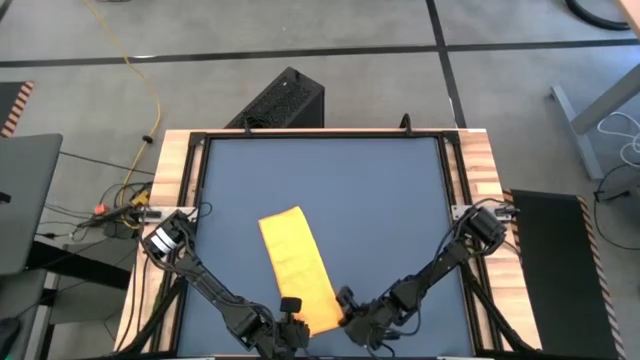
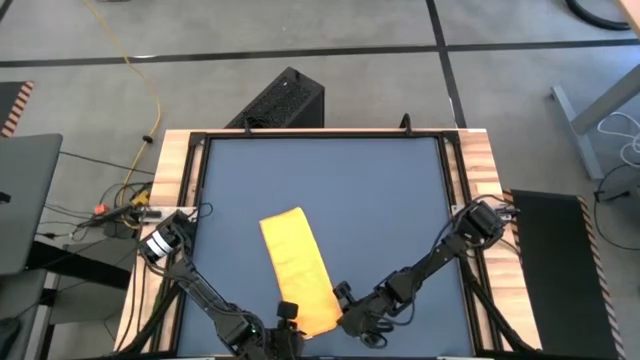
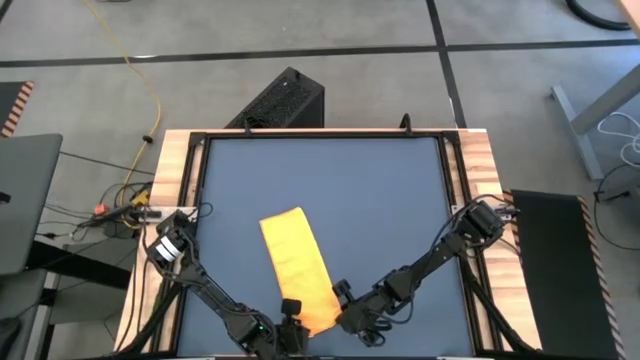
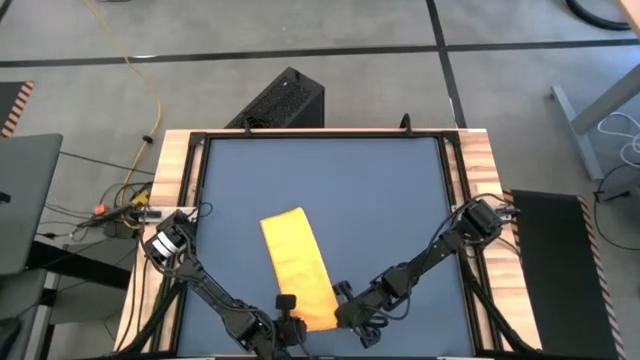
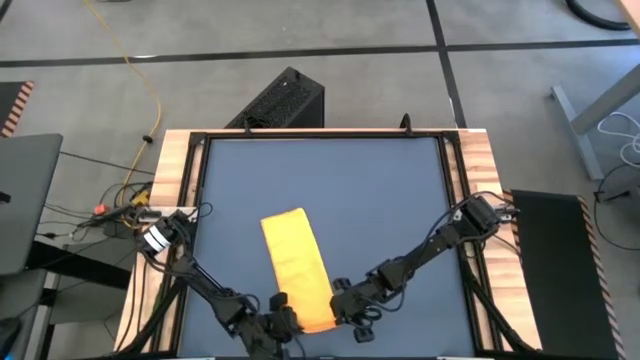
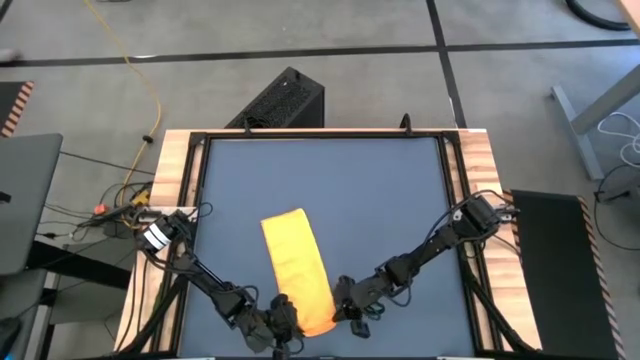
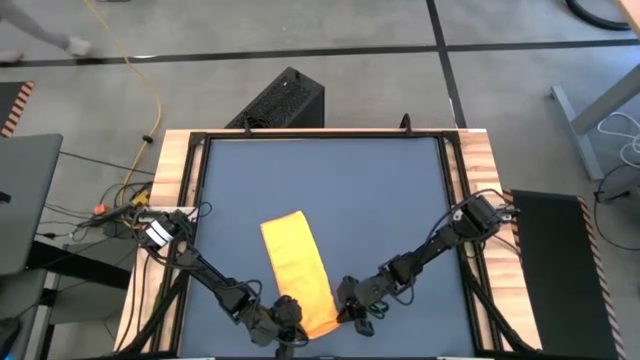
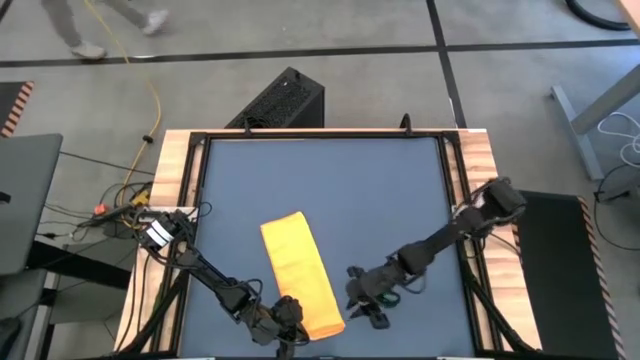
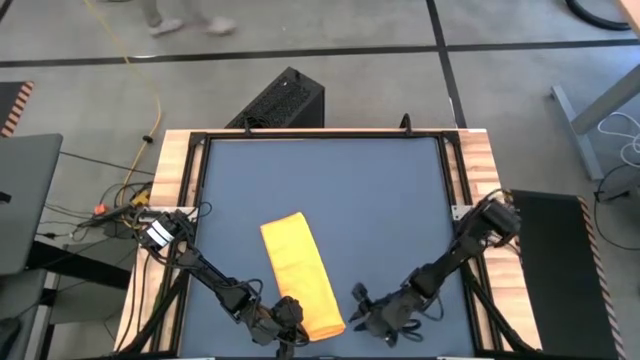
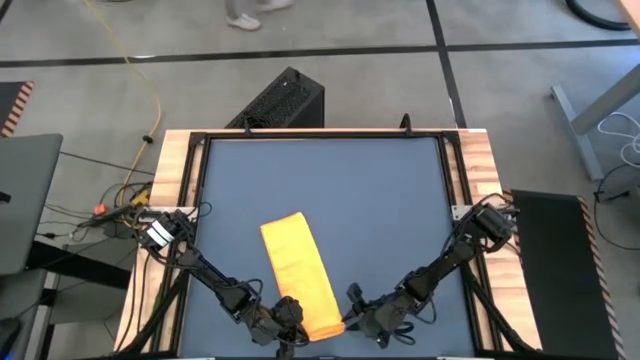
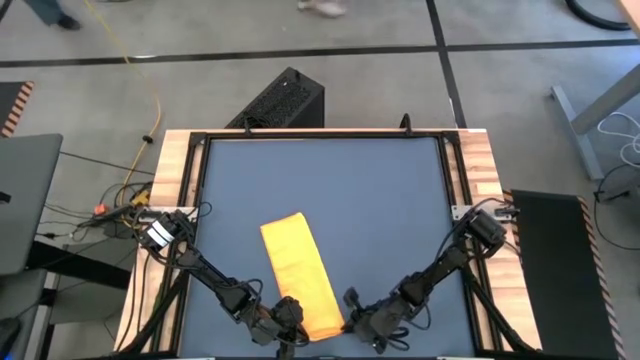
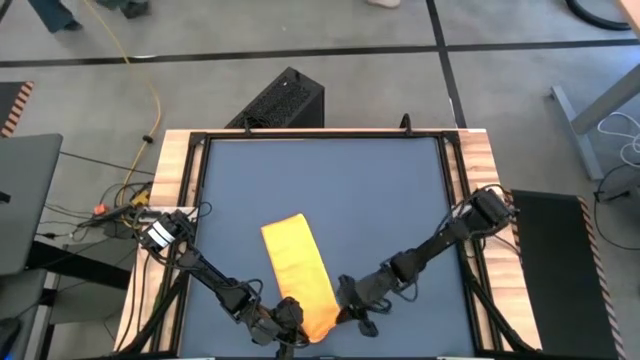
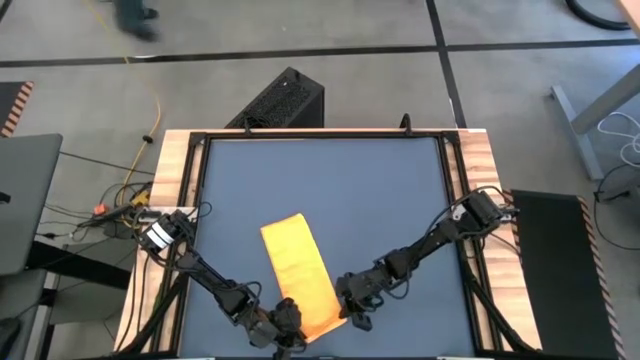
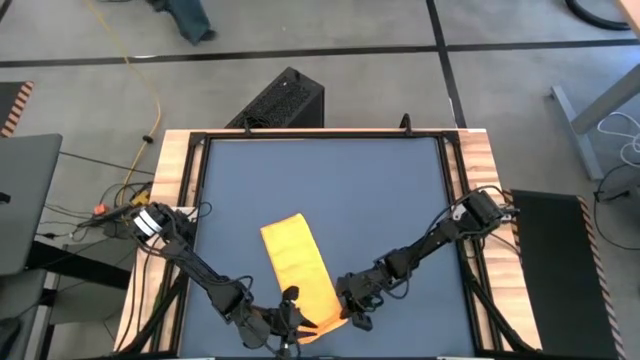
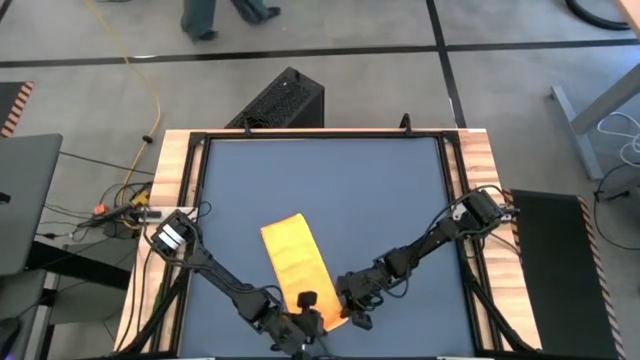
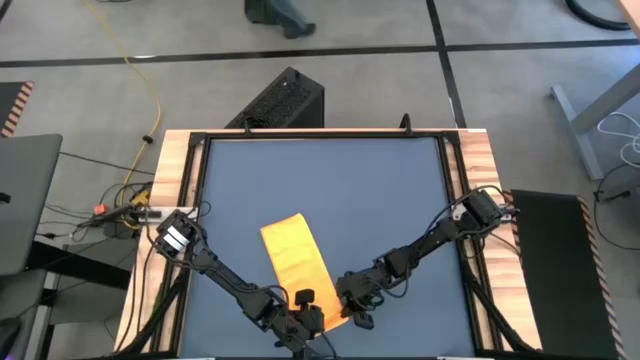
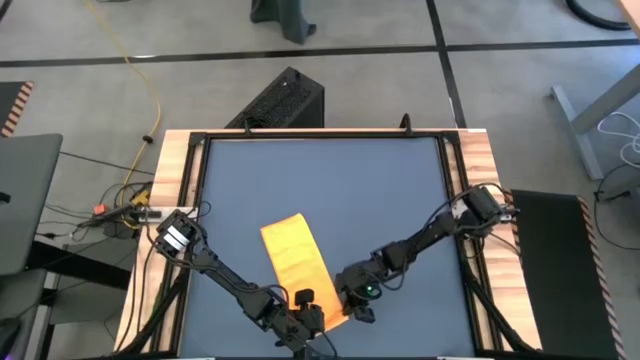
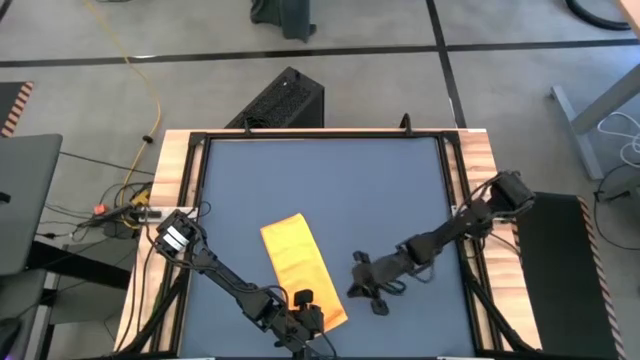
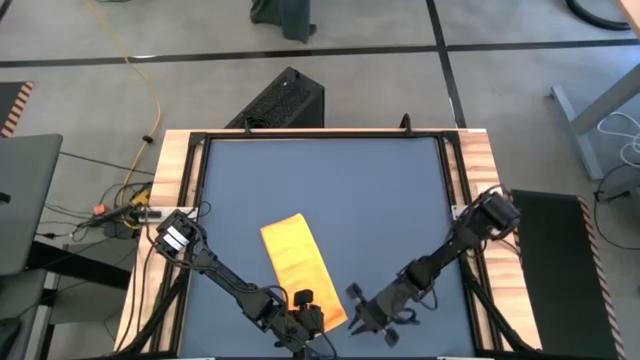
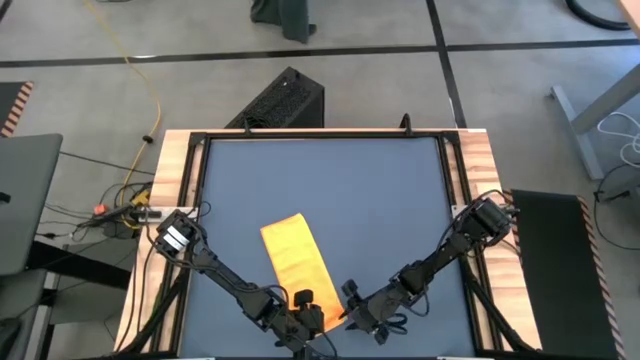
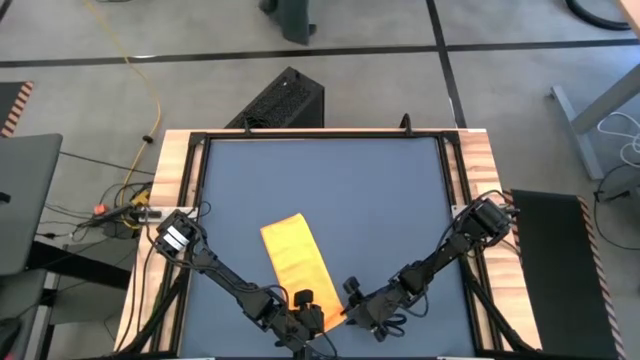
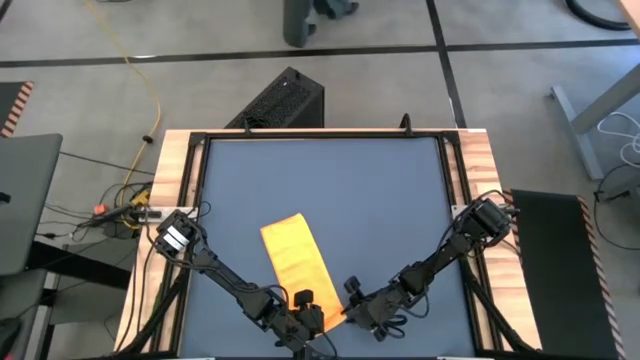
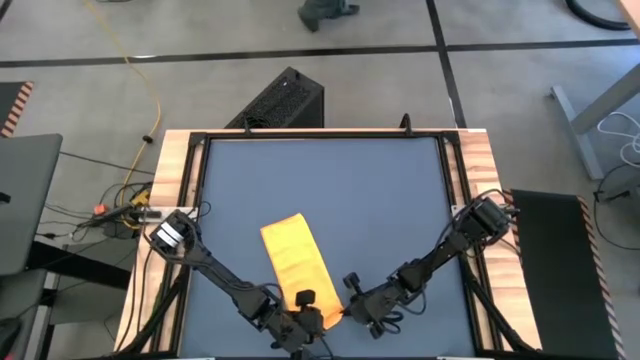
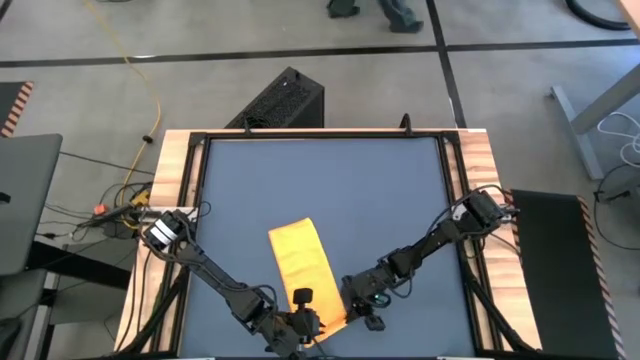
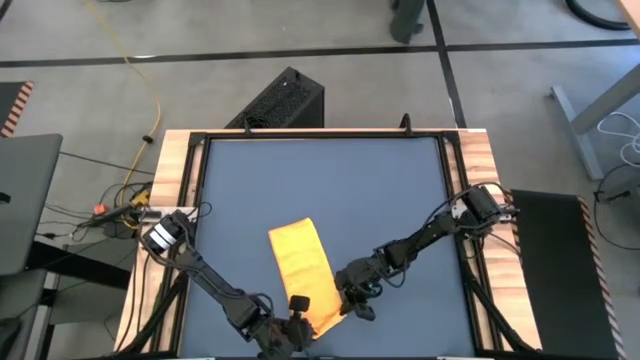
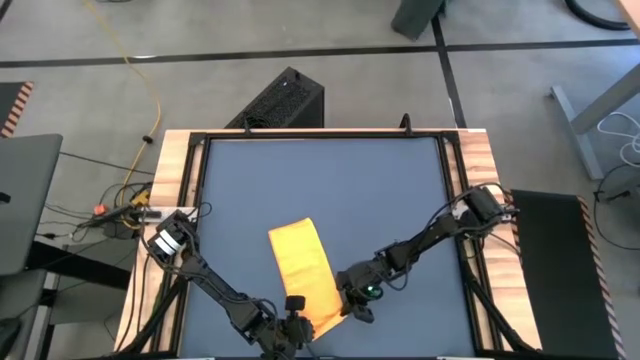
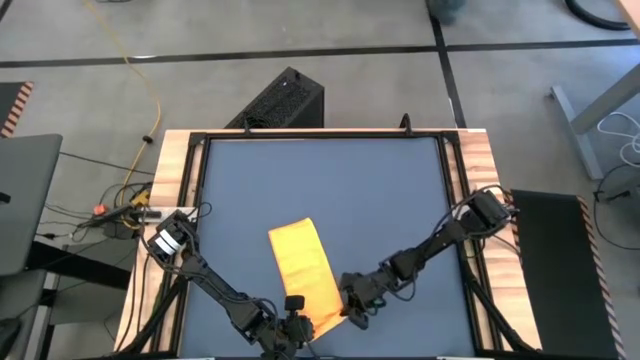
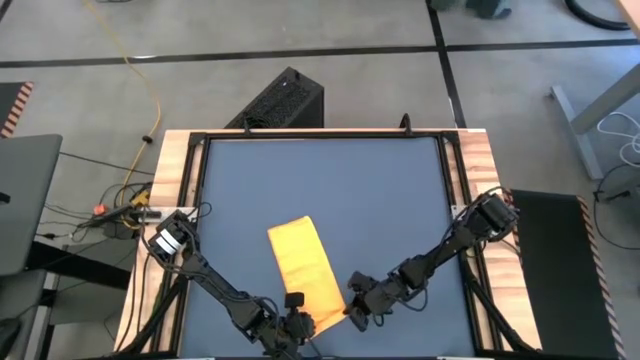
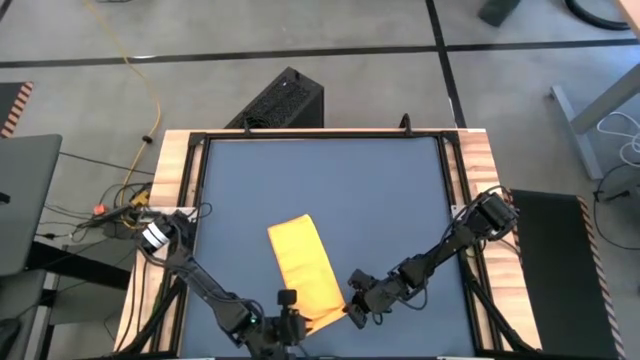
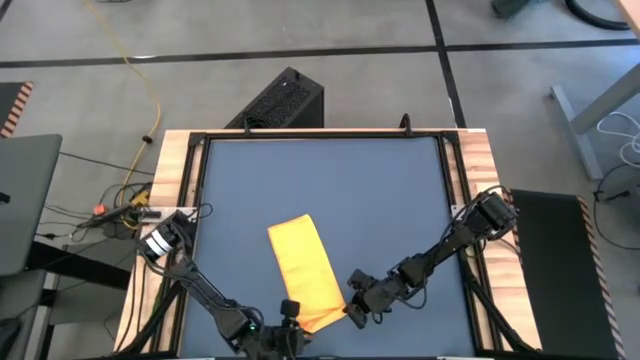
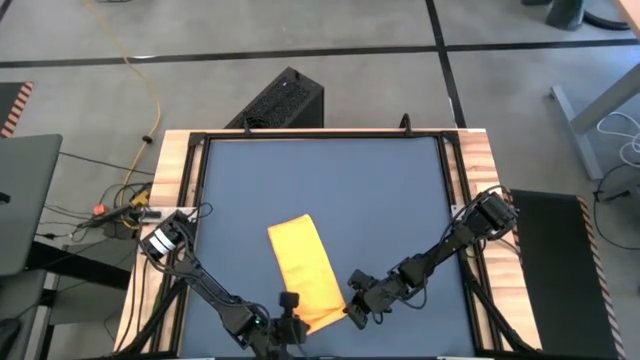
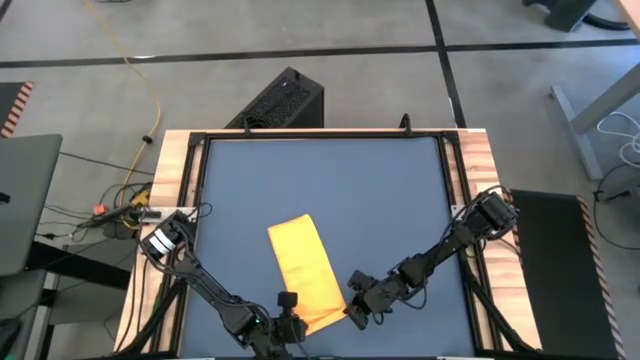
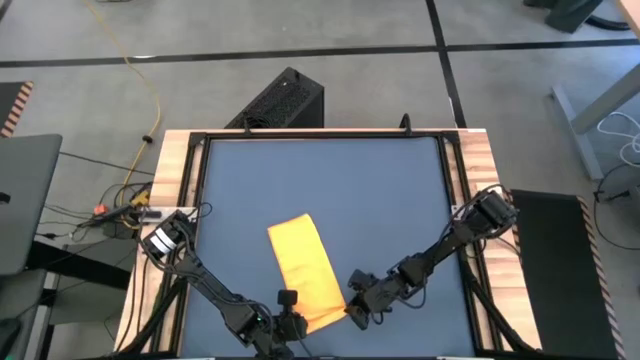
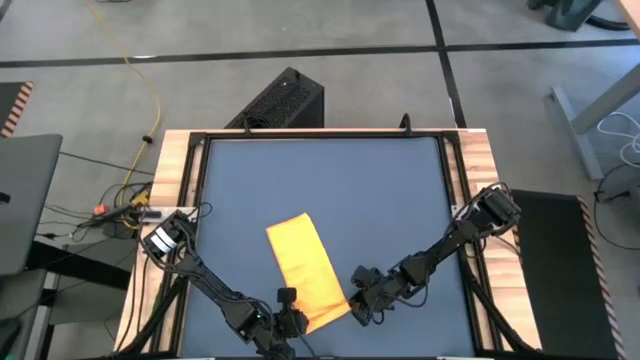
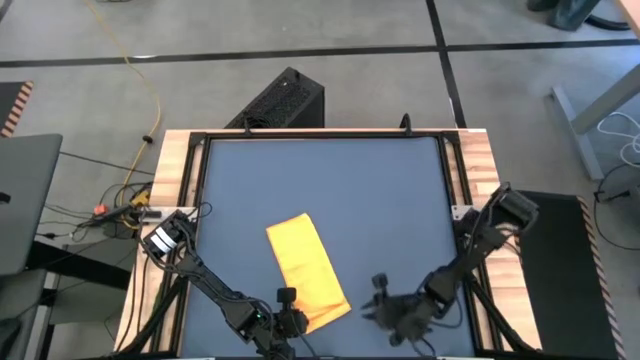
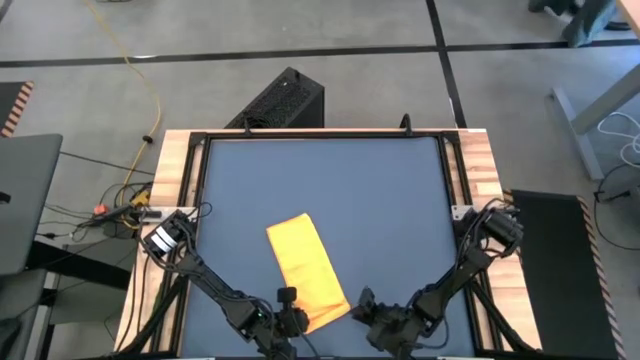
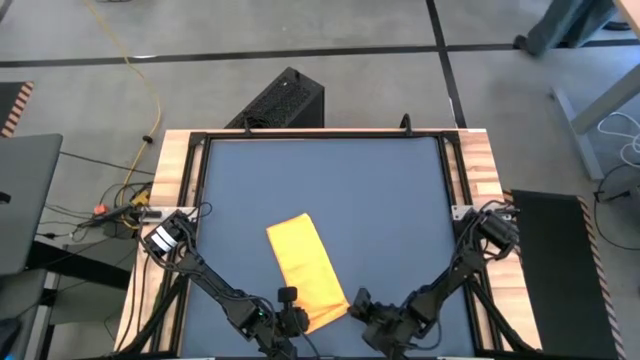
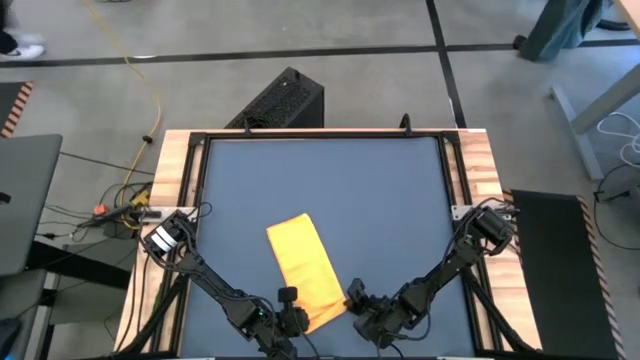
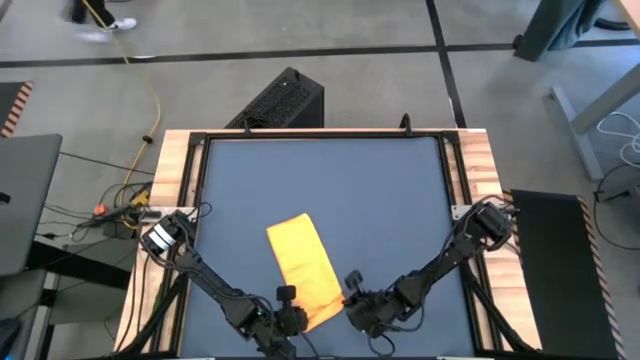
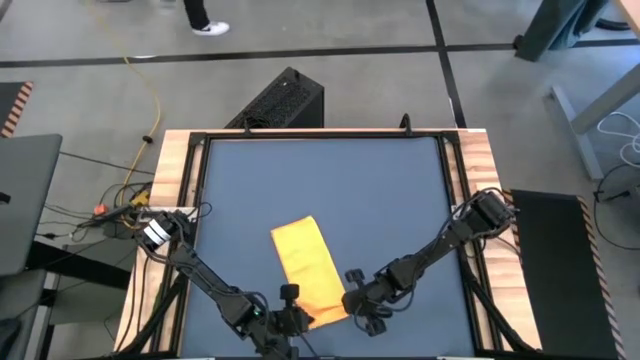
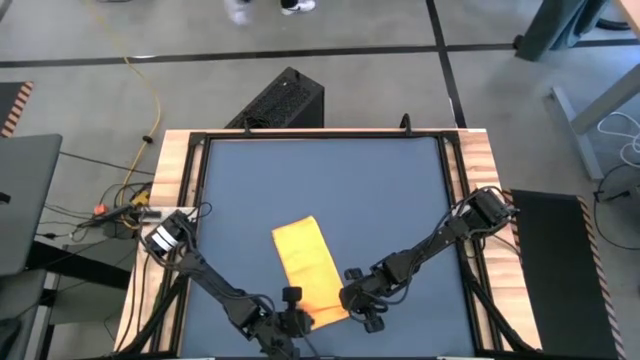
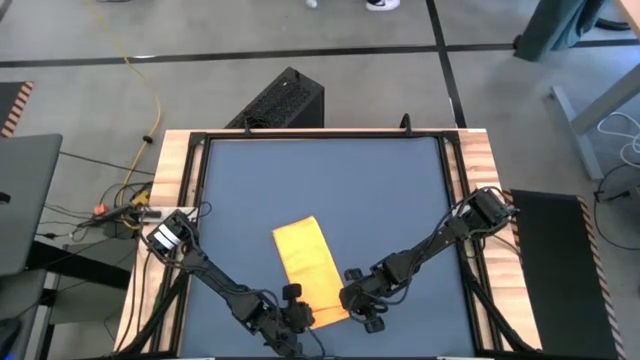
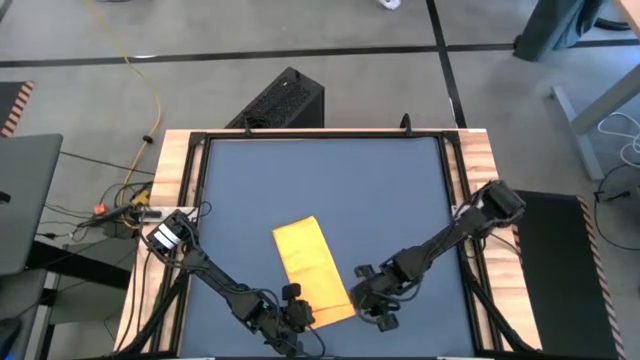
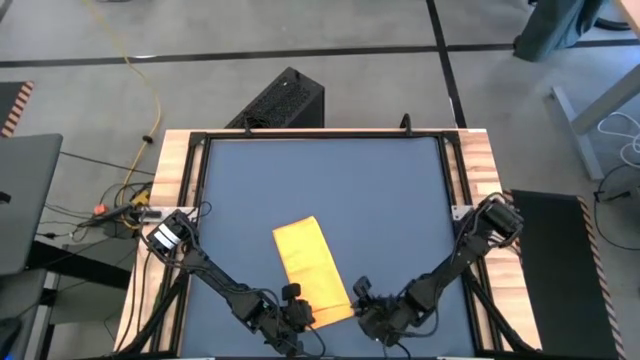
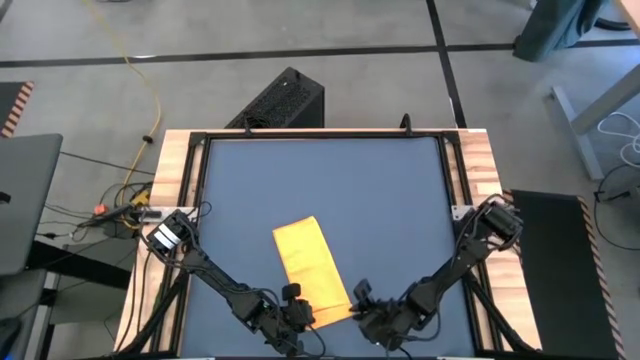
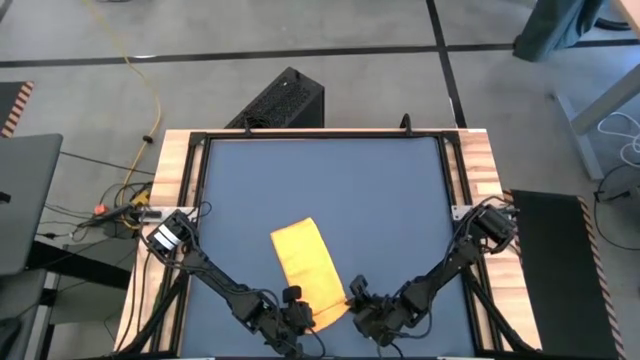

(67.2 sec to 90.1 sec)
Task: Roll towel into tight, uniform cylinder
Roll the orange microfiber towel
